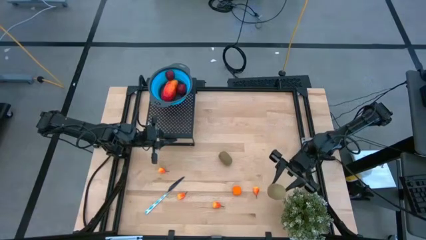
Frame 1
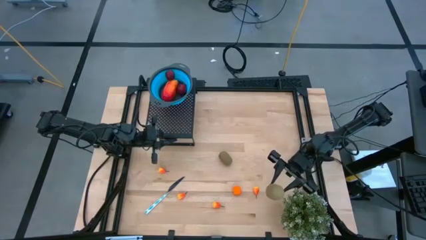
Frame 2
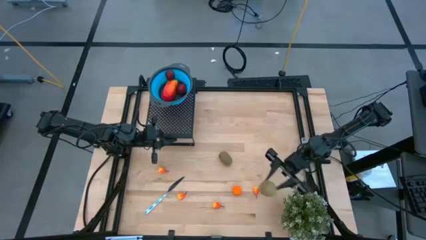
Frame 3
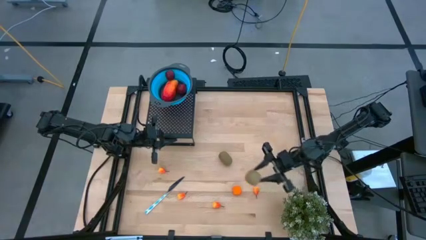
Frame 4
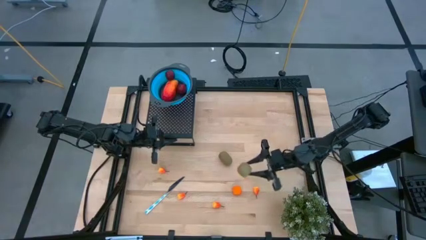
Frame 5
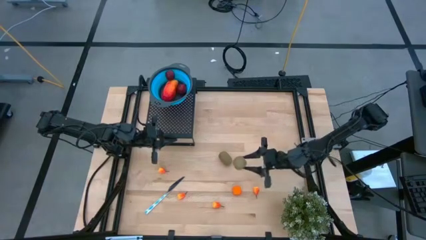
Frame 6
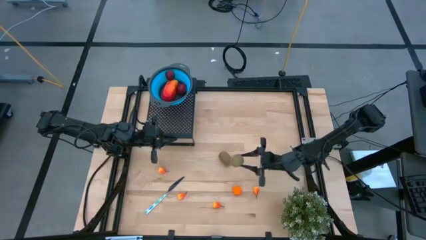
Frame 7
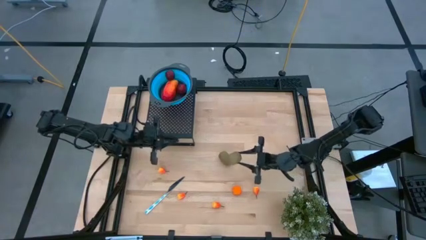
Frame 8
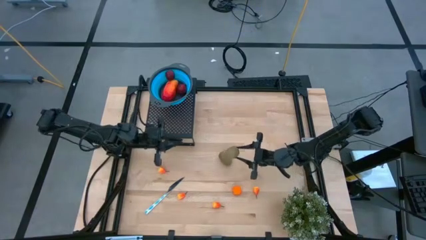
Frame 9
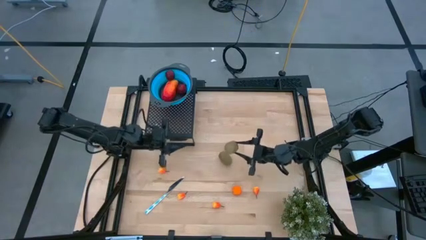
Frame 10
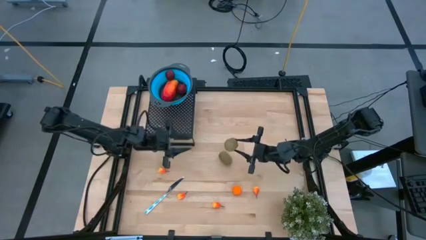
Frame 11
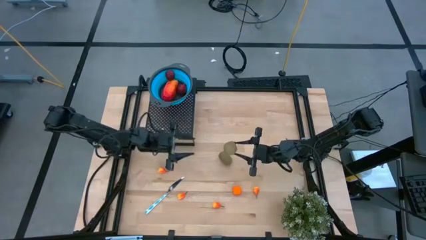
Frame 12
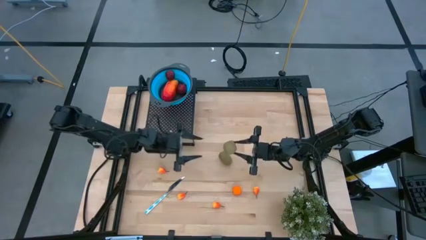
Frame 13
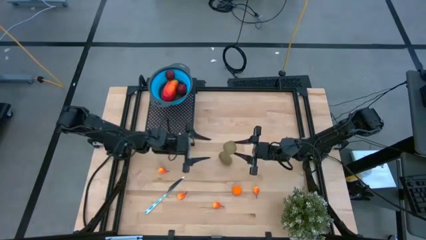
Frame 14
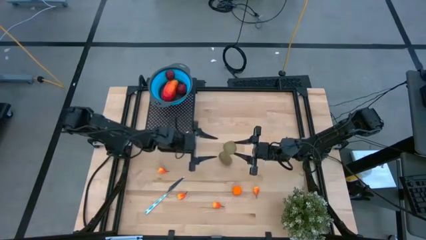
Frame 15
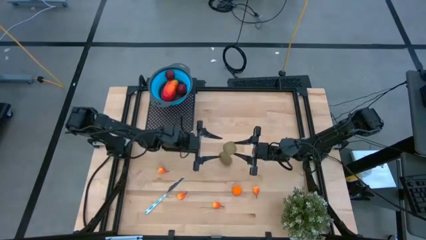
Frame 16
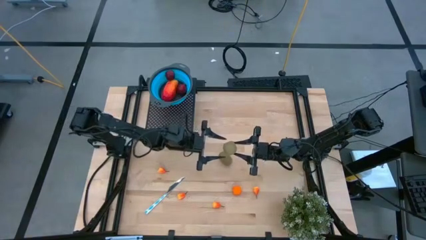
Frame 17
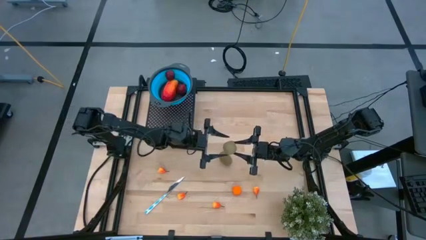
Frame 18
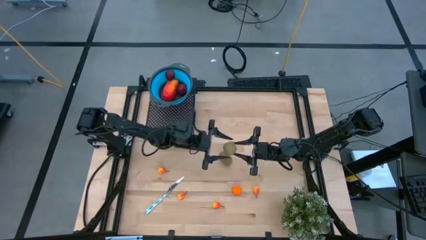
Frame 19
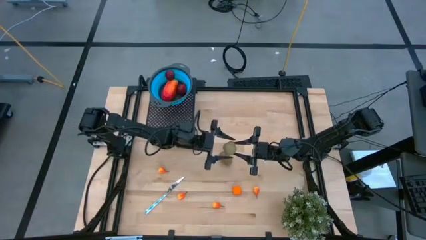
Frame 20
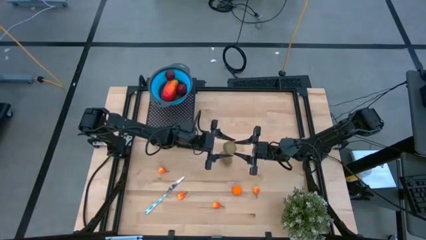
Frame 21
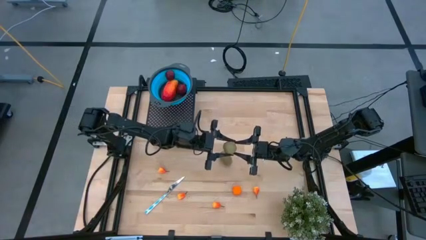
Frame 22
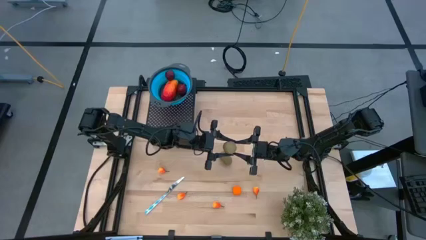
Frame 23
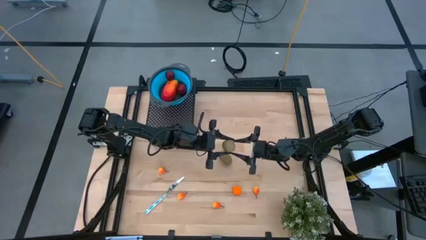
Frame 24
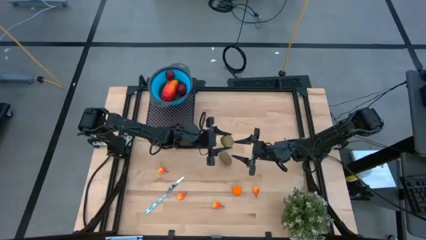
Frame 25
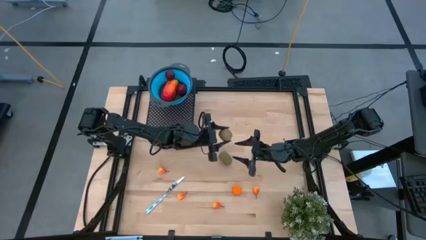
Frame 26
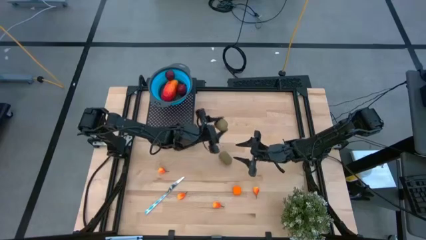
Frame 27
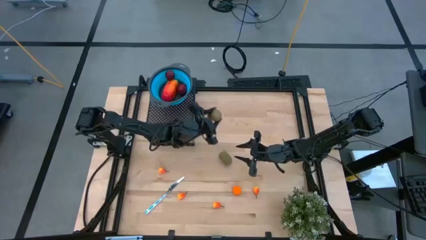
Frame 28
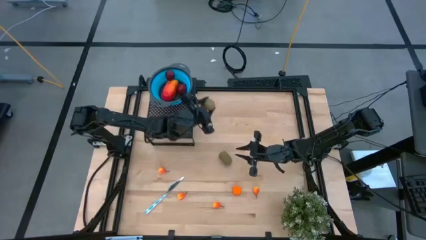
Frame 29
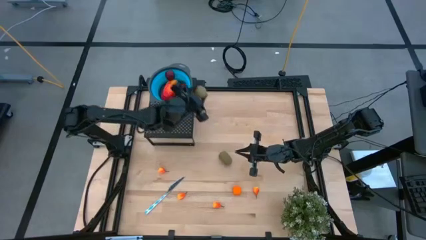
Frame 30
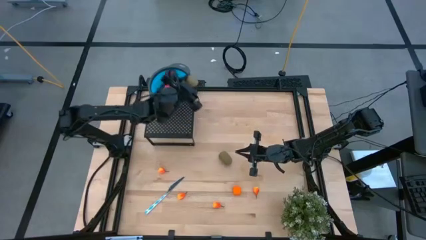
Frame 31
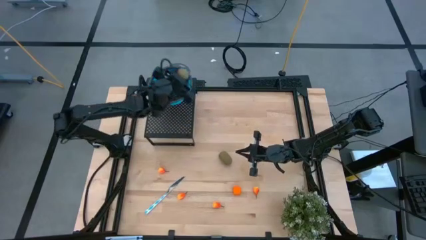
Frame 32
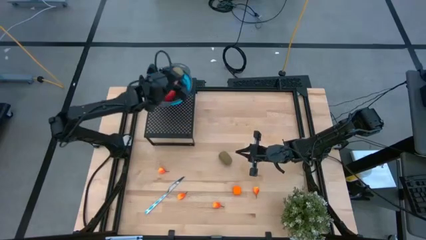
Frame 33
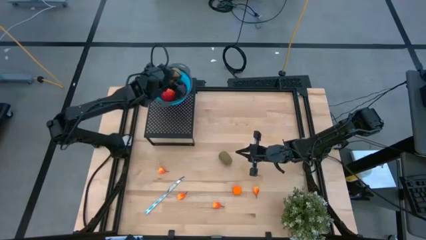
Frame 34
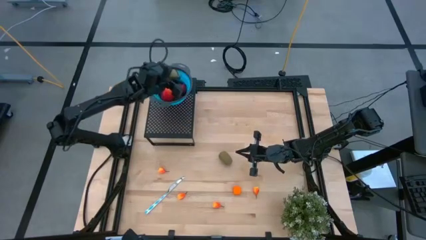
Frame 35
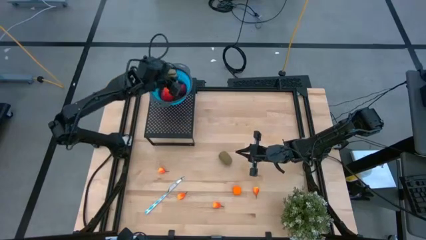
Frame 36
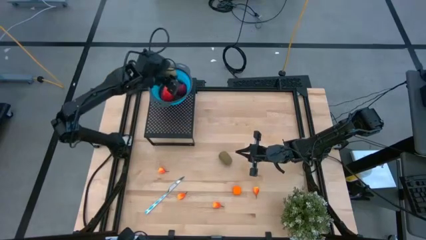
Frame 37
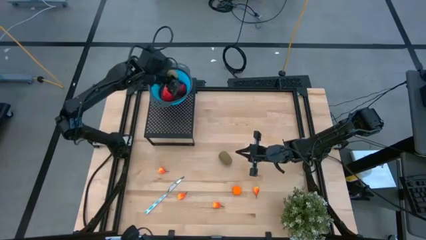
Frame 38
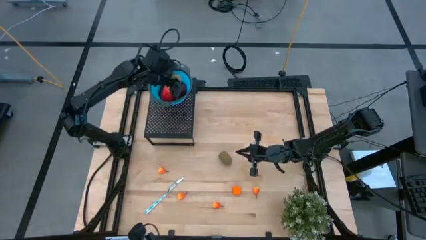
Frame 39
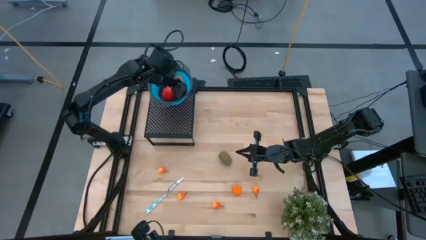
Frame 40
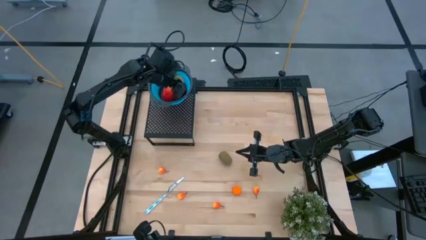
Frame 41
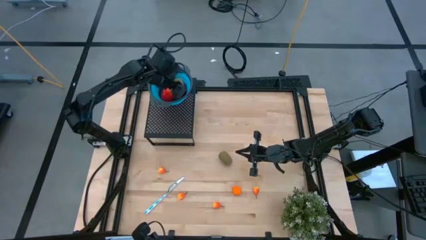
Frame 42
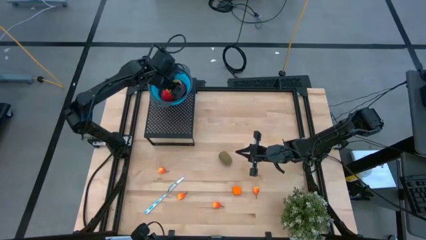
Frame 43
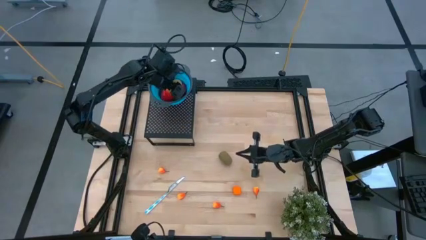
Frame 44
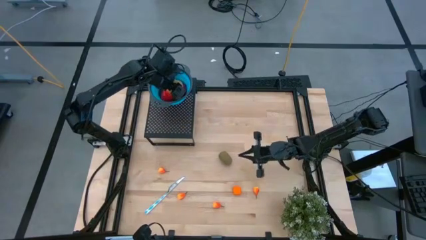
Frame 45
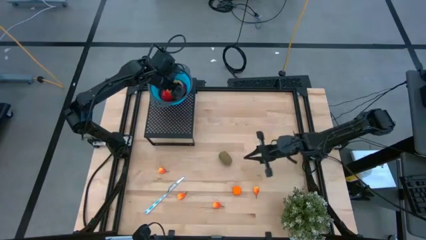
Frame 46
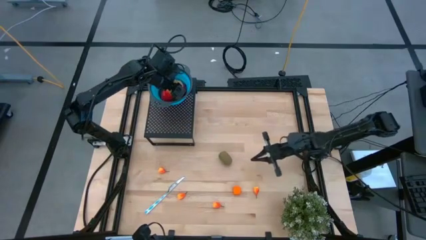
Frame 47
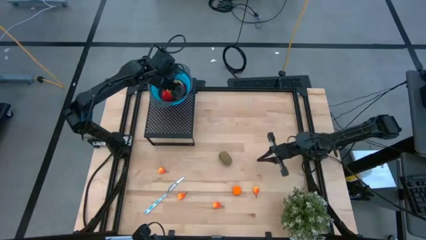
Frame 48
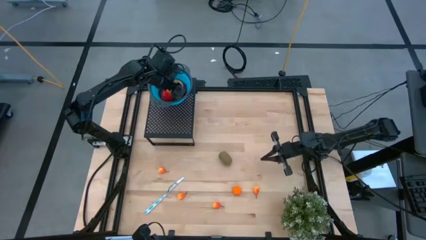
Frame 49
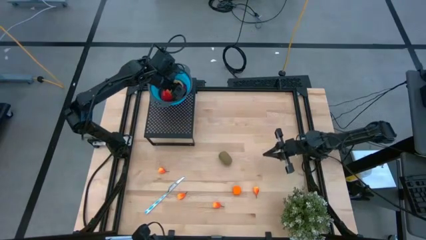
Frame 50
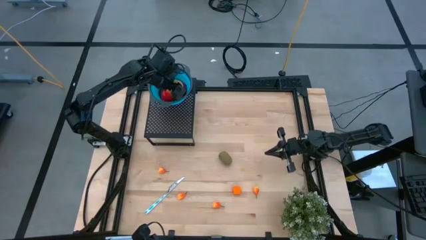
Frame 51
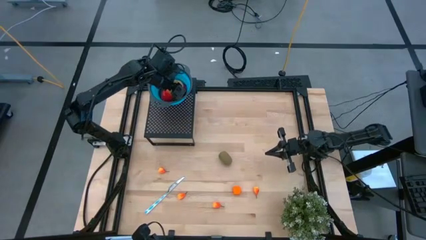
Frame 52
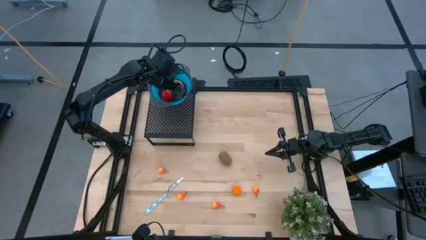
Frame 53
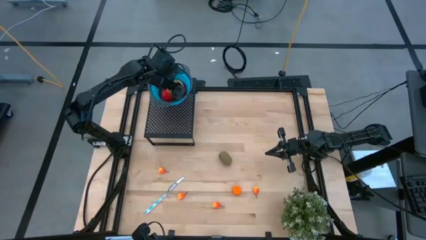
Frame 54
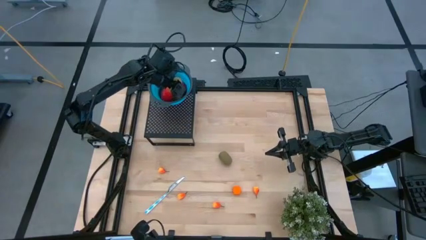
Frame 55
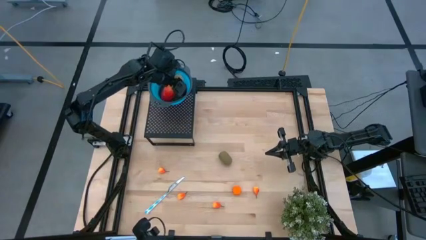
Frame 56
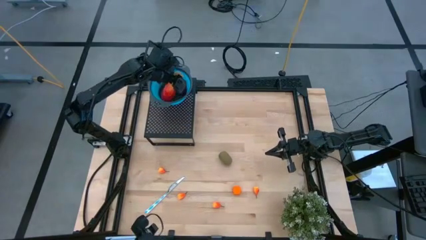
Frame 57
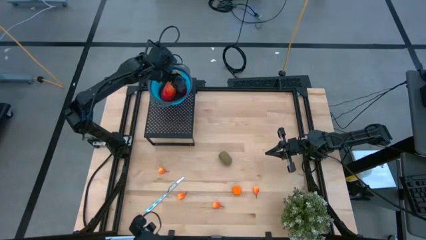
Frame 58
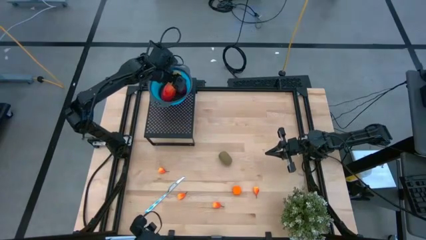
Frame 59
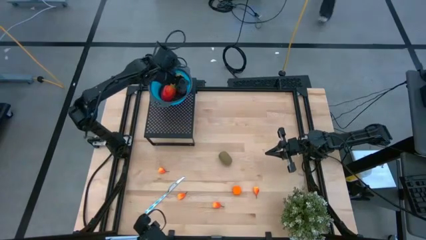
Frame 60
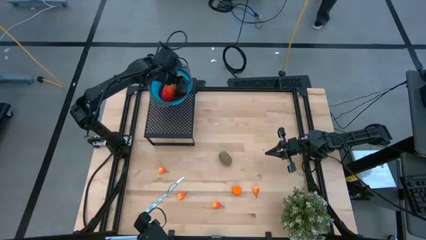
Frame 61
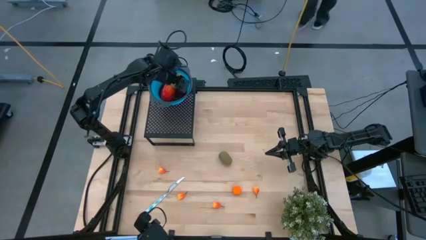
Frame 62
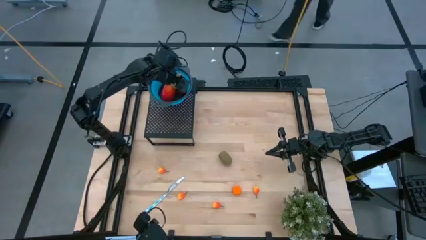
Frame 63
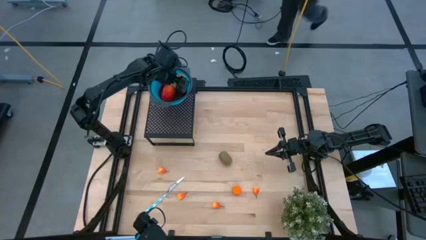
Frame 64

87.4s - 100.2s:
Task: Pick & Place Fruit
Put the right kiwi into the blue strainer bowl on the shelf

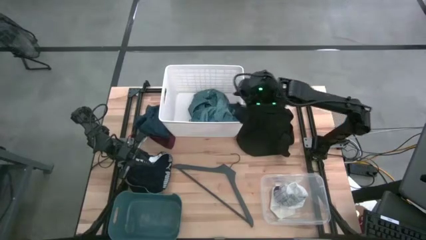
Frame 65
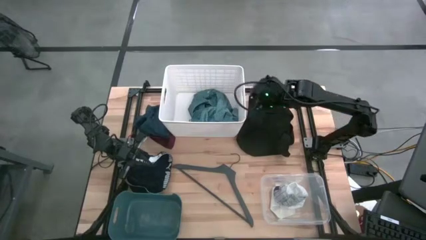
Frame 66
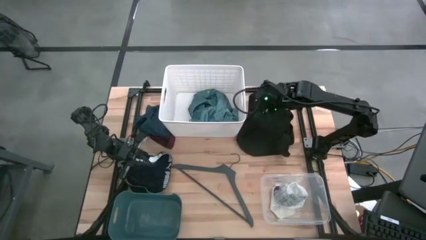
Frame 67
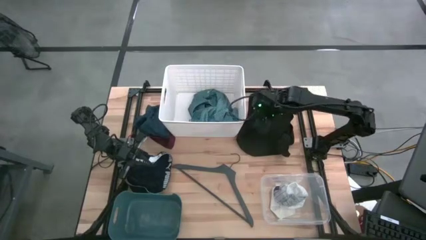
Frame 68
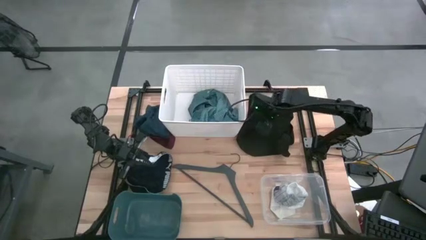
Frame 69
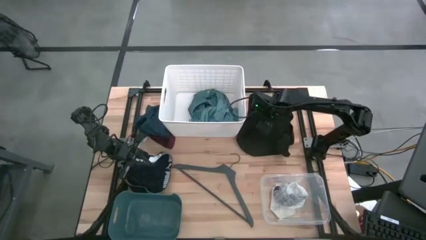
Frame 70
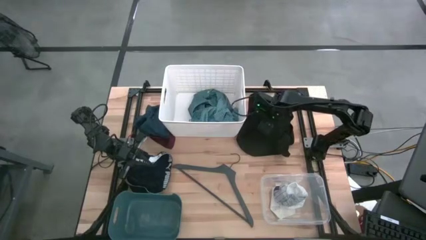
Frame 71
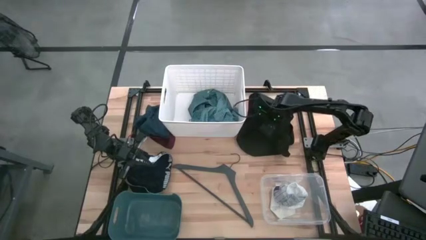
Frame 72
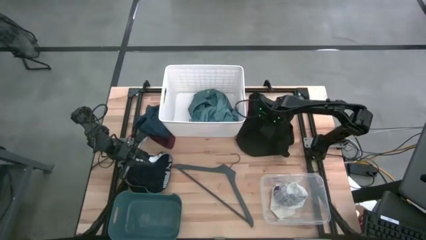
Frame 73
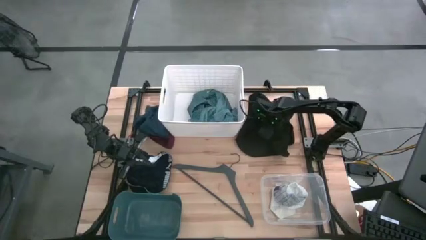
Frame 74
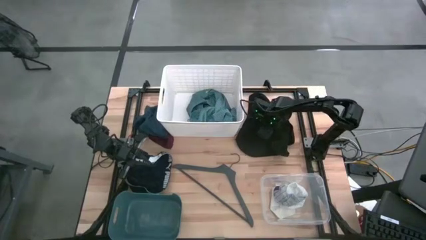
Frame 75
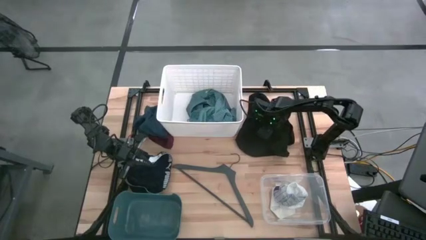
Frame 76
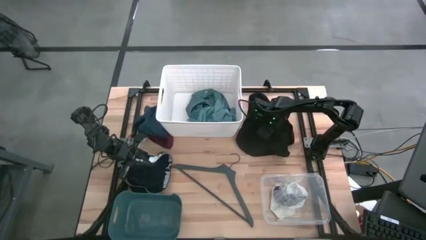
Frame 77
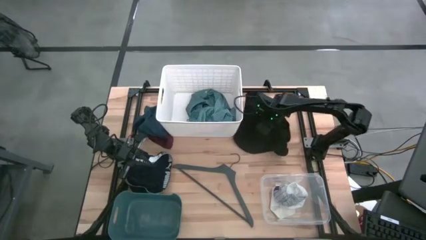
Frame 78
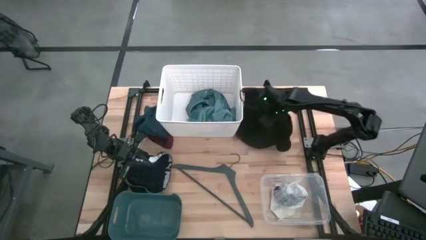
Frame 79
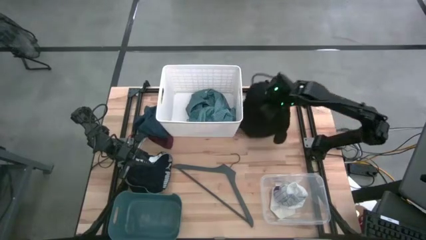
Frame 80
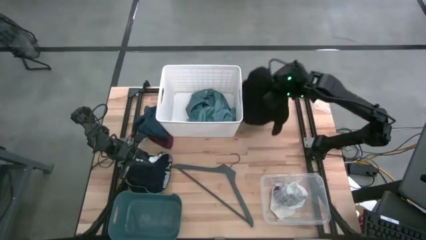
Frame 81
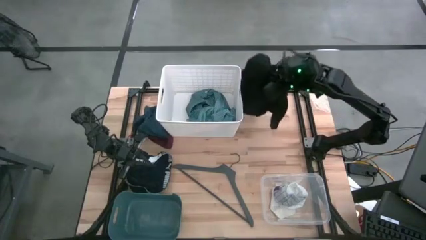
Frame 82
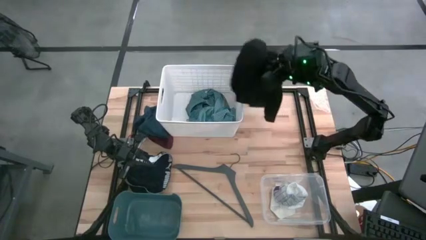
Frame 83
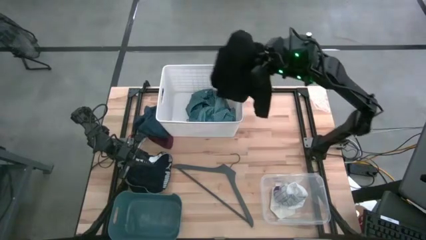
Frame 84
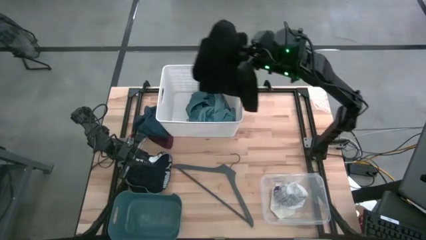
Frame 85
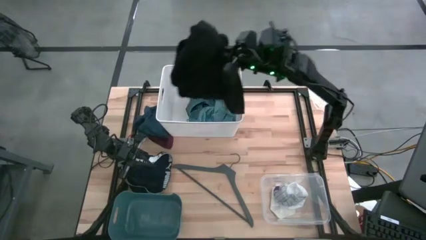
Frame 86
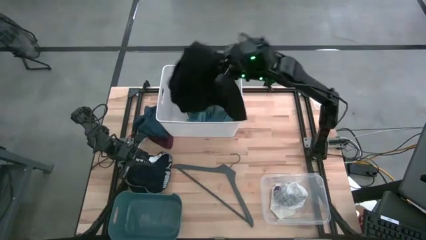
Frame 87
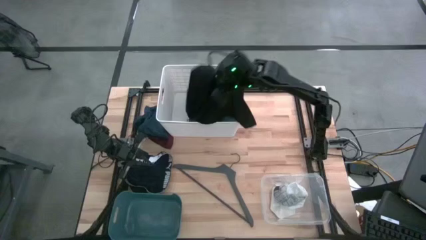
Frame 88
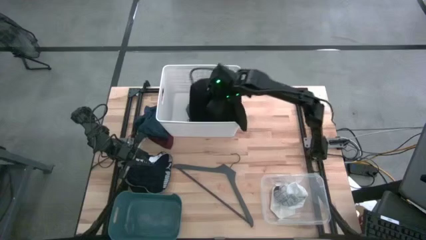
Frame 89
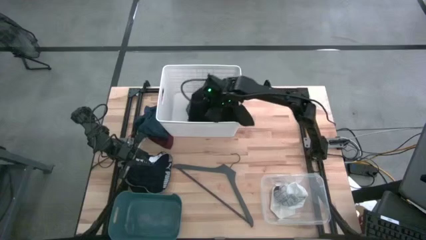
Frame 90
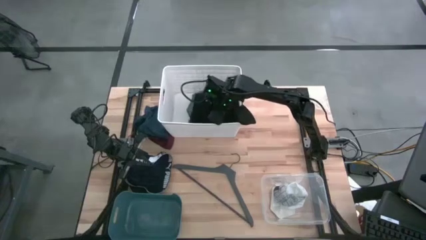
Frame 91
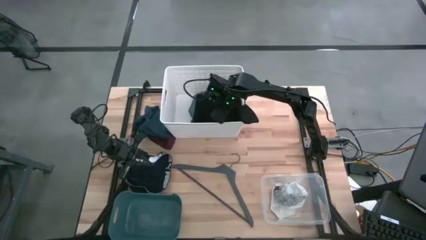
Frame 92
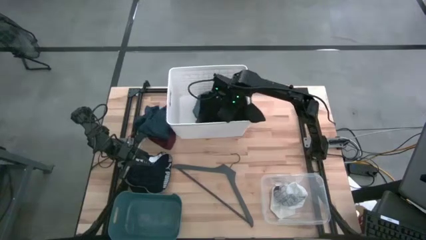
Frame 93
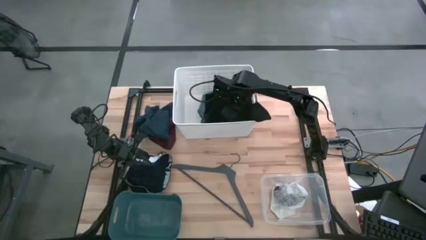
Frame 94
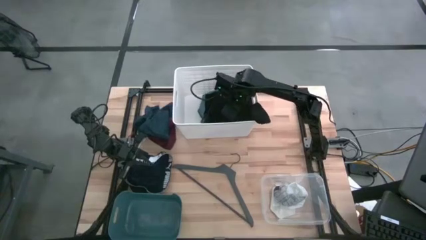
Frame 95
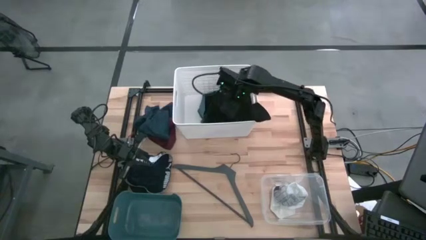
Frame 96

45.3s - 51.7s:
Task: Pick & Place Cloths
Put the black shirt into the white laundry bin
